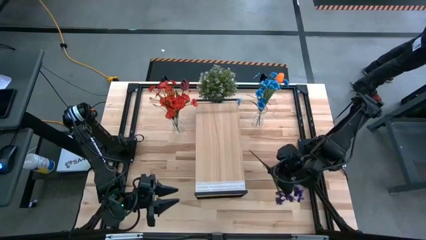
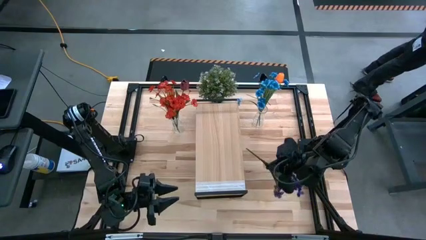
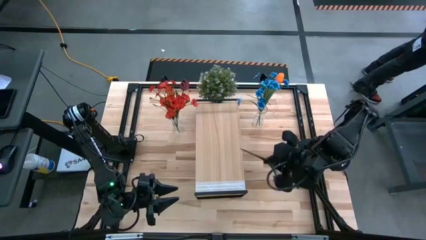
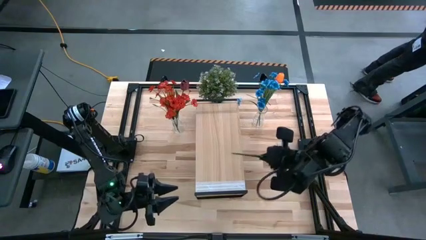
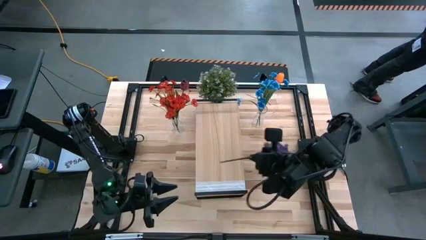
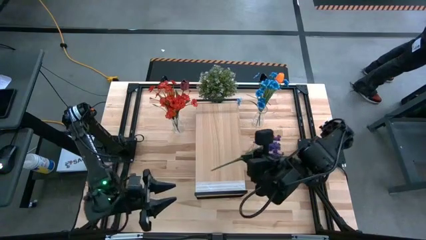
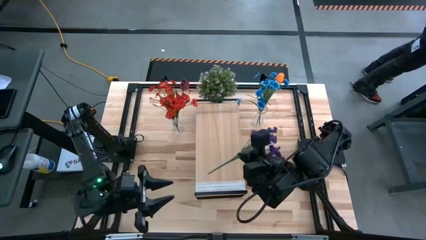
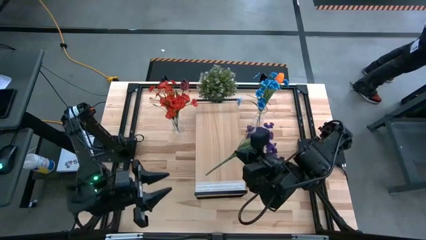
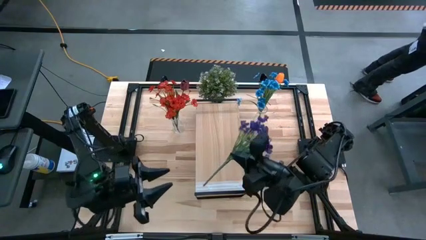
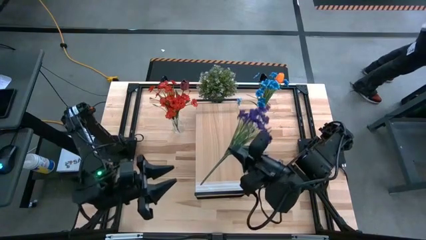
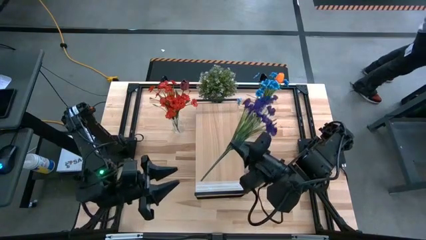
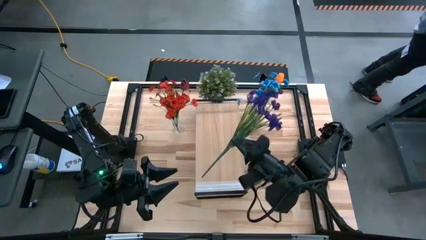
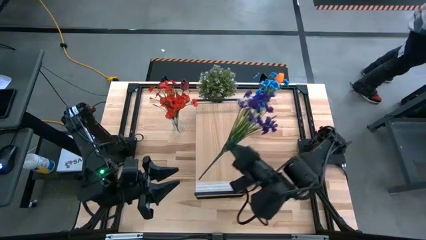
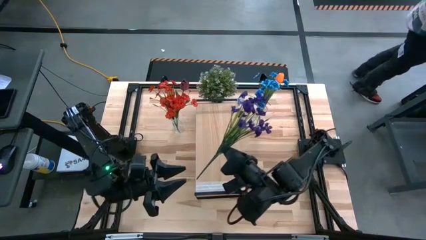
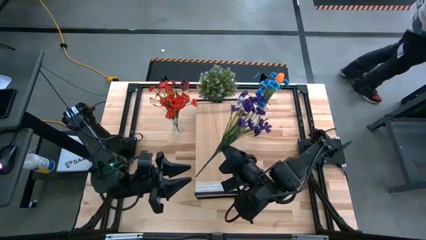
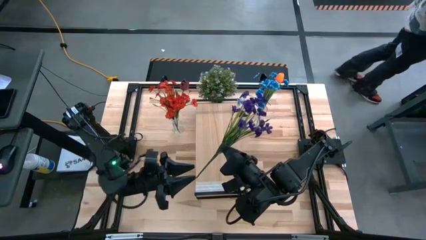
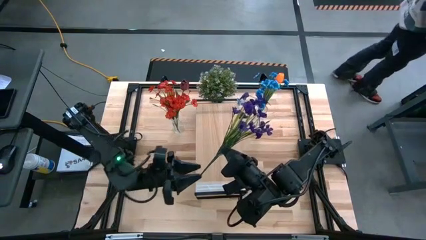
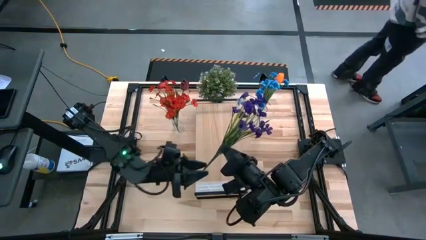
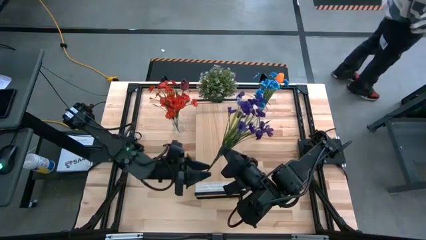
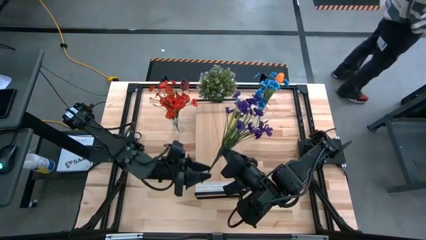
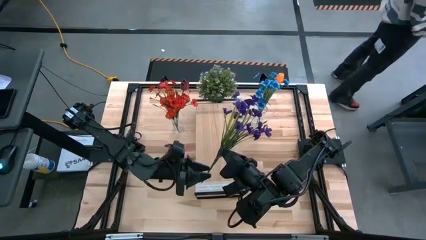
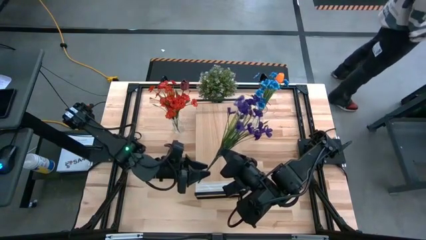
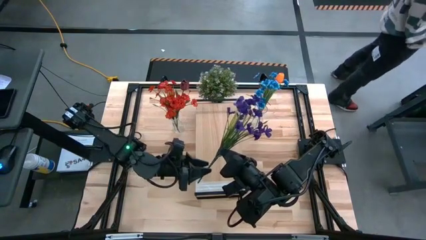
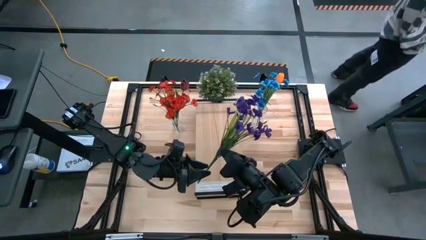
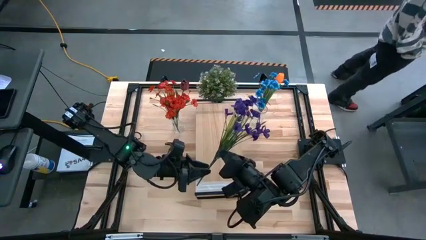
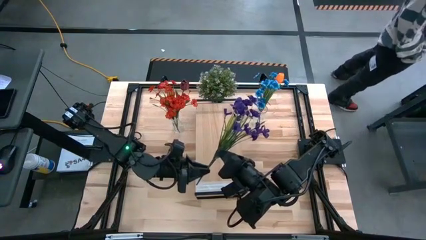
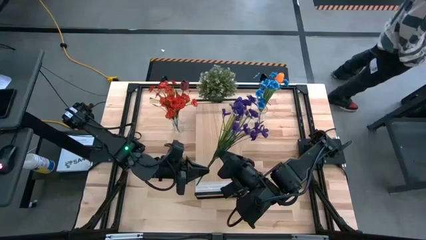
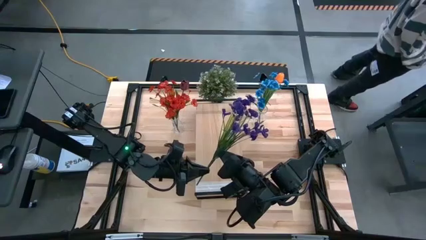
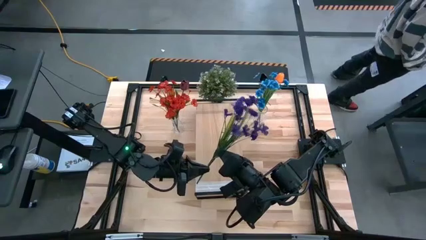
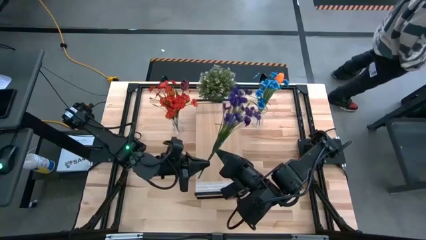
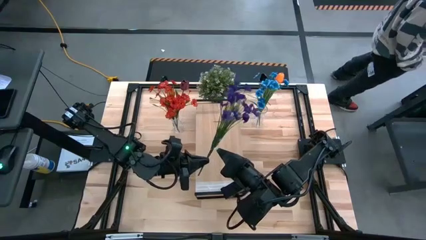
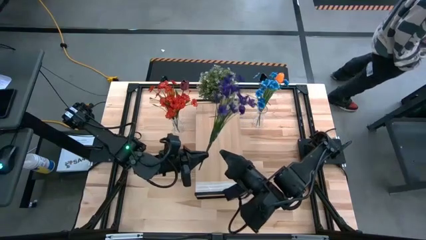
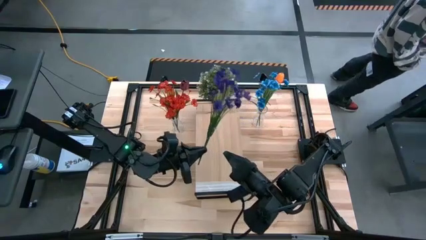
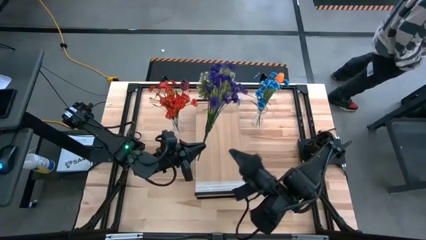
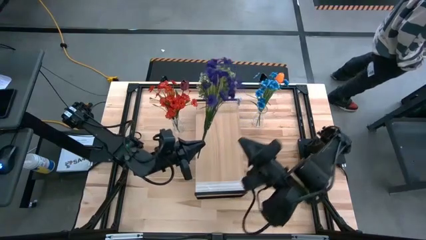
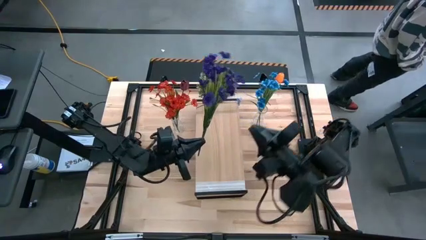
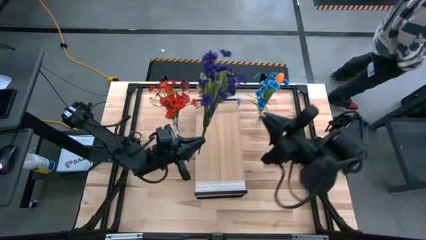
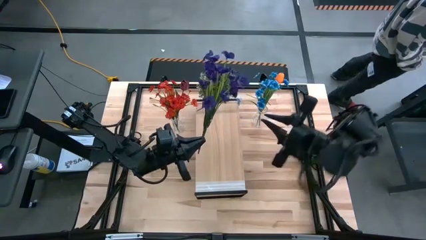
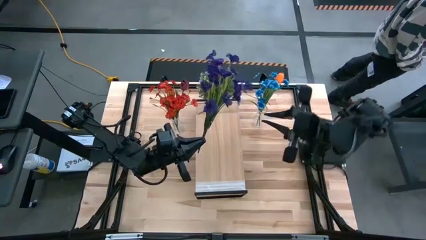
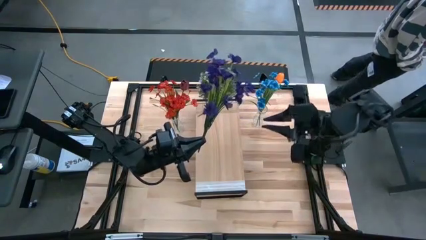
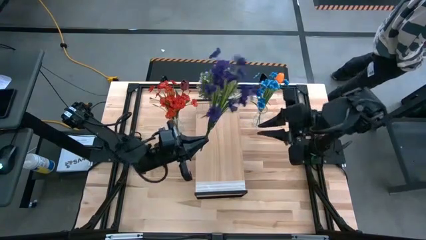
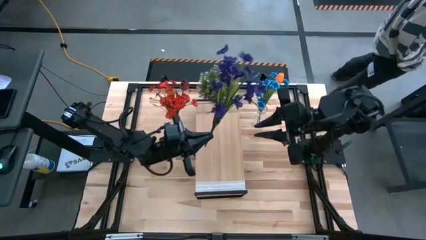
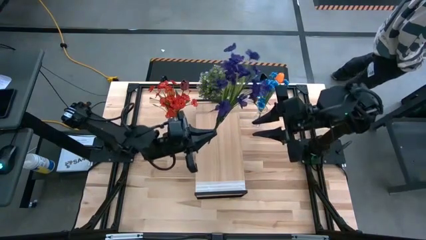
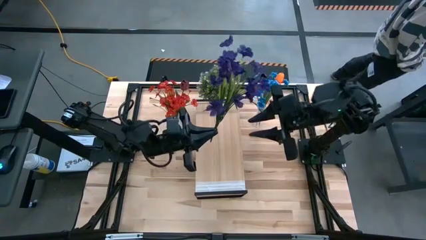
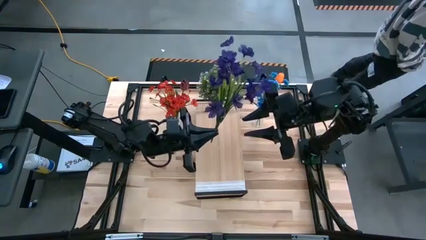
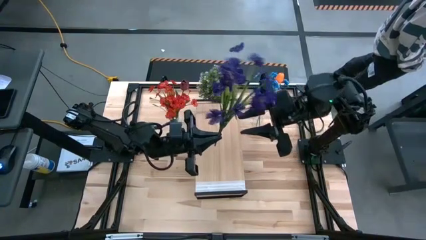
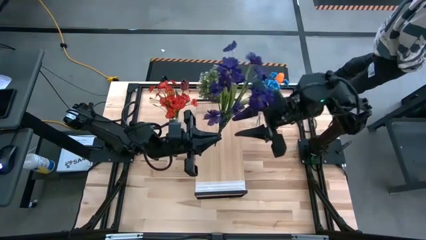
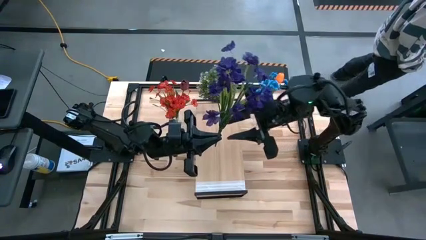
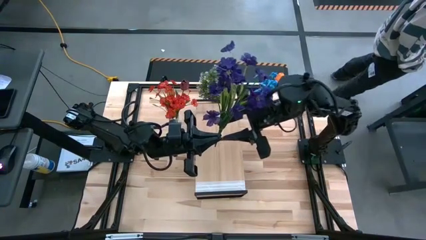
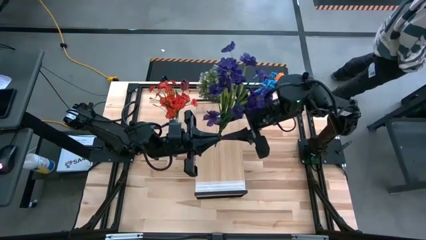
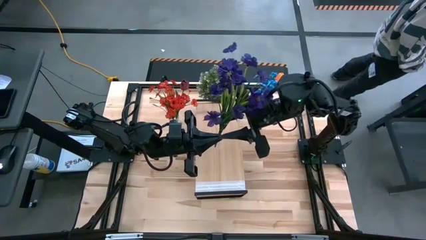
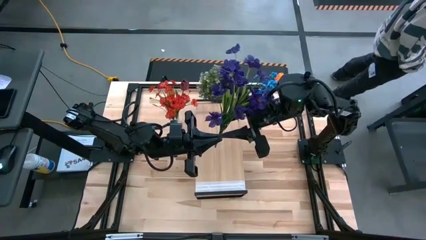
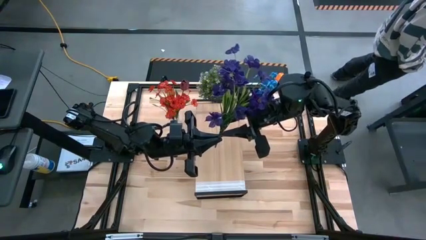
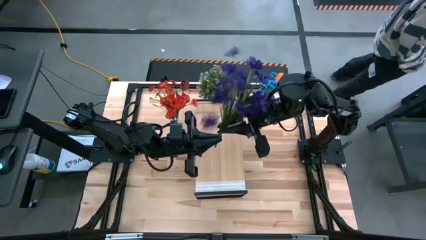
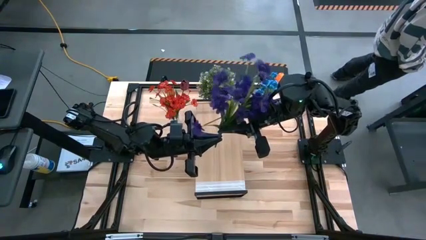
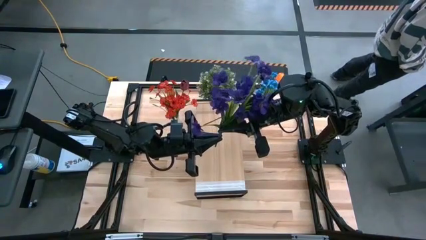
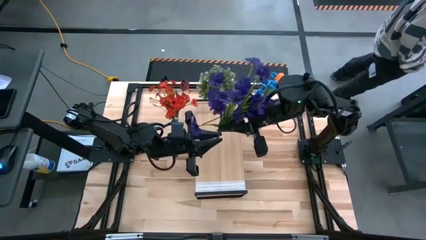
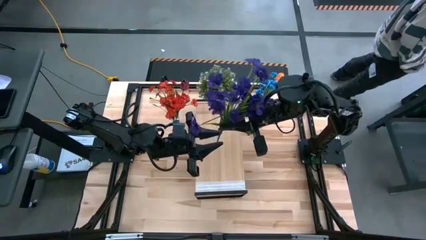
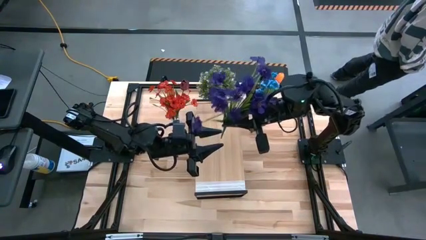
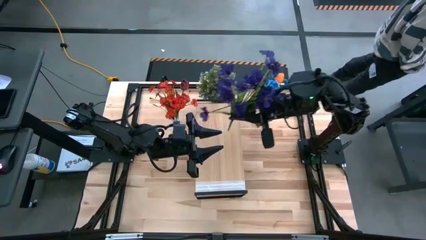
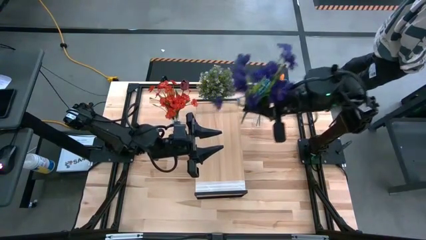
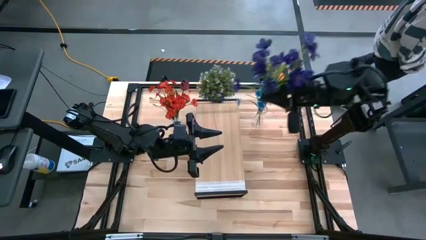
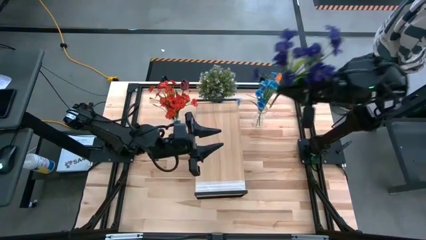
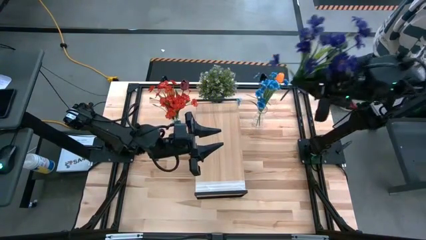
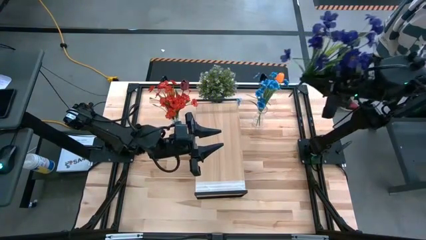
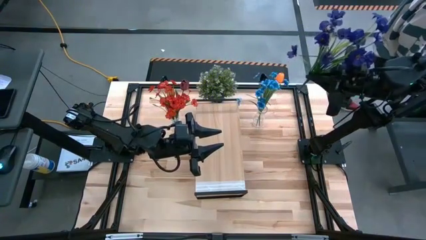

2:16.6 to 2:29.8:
Task: Pick and place flowers into a vace then onto a shelf
Put the violet flowers into the right transparent vase
